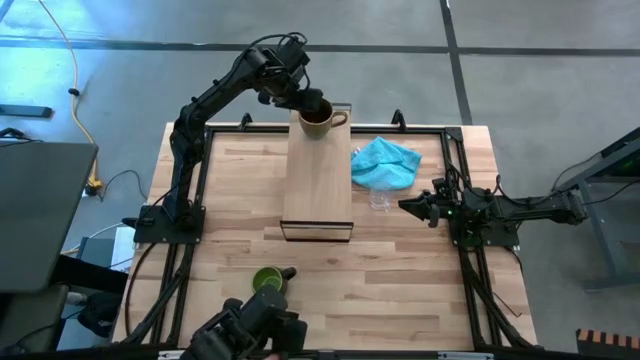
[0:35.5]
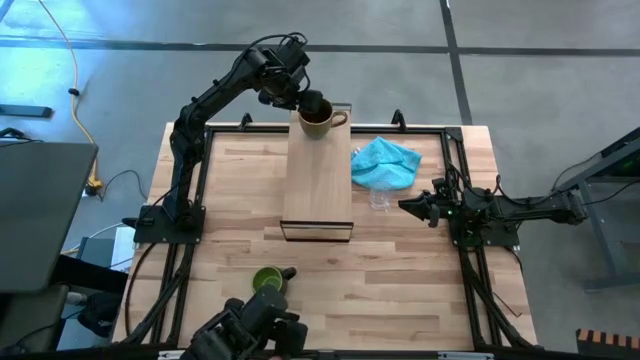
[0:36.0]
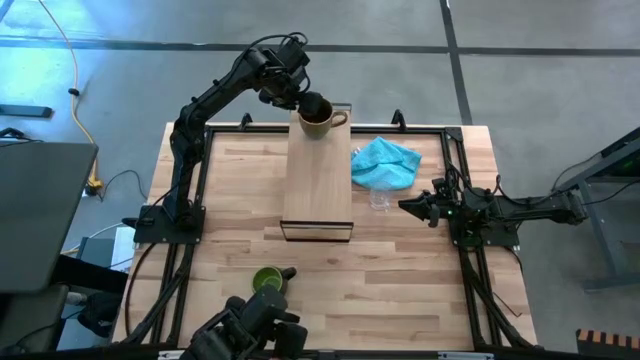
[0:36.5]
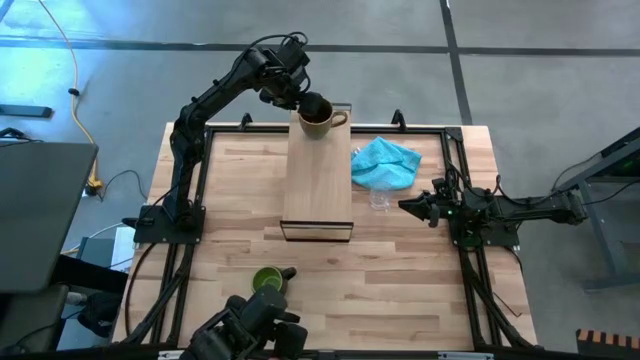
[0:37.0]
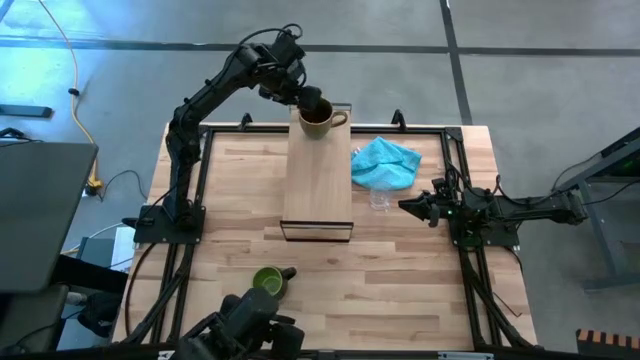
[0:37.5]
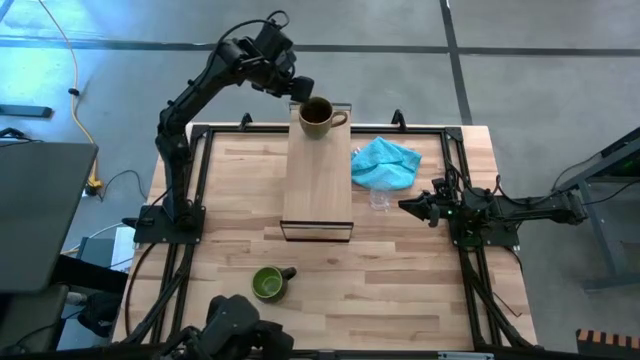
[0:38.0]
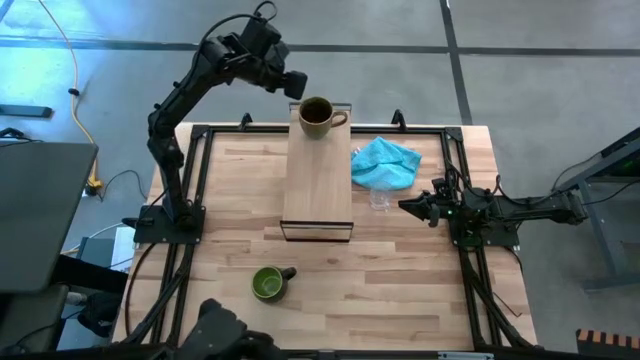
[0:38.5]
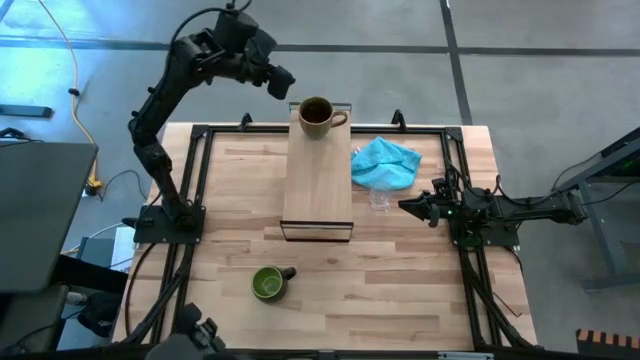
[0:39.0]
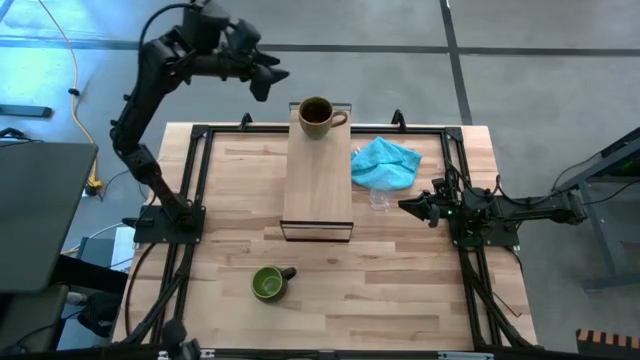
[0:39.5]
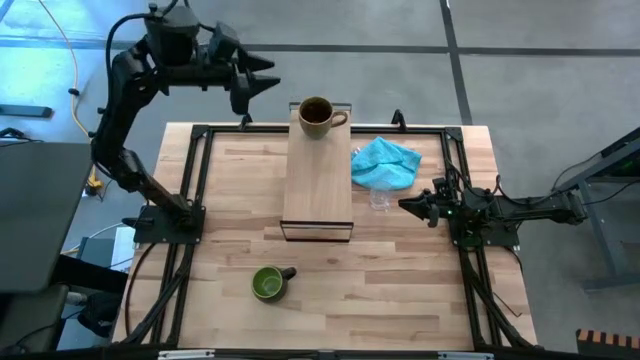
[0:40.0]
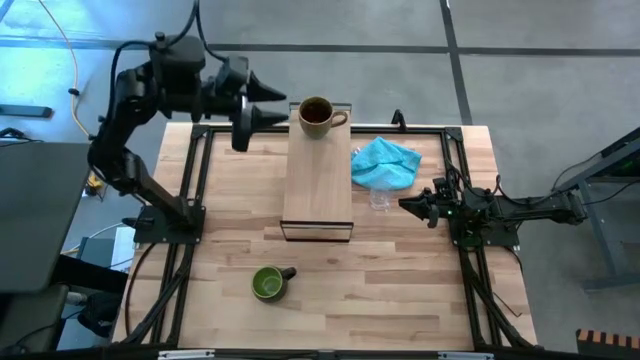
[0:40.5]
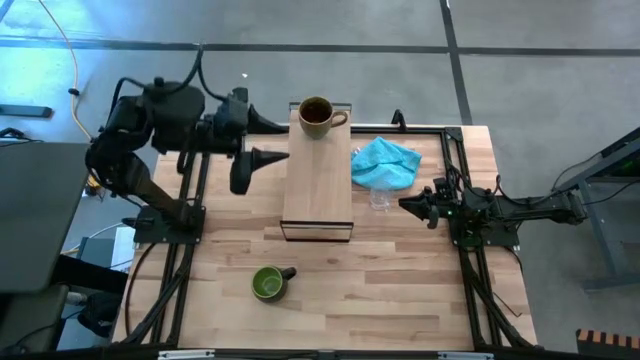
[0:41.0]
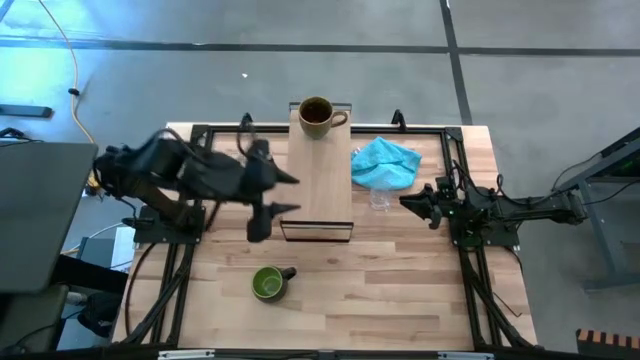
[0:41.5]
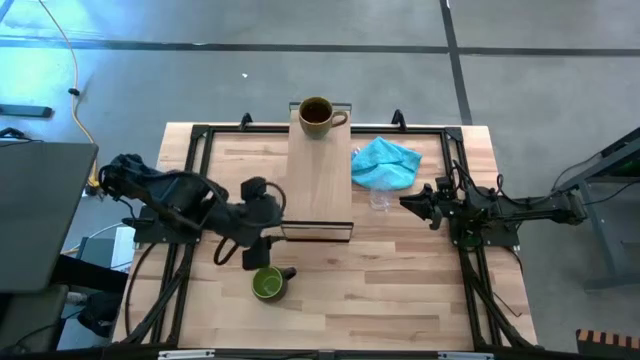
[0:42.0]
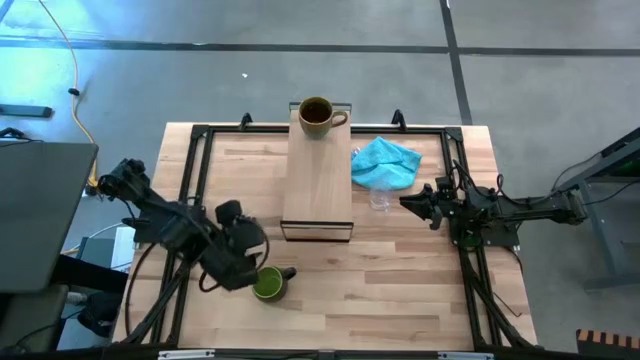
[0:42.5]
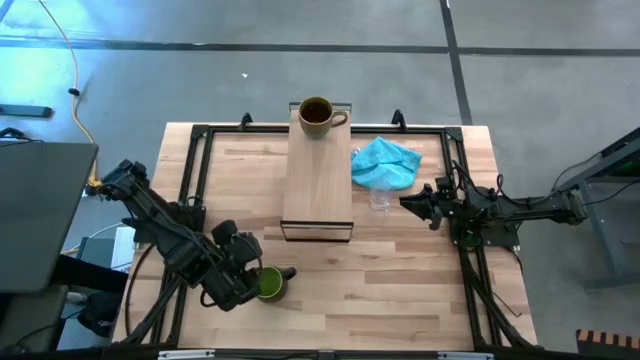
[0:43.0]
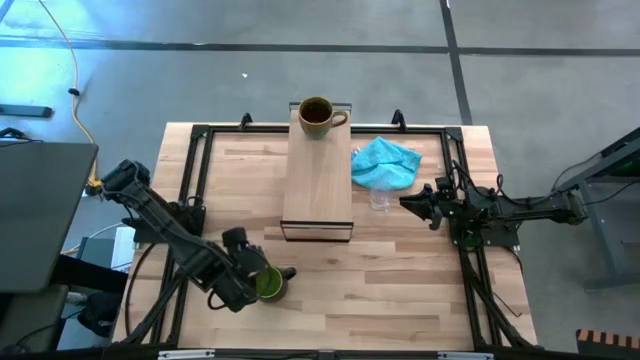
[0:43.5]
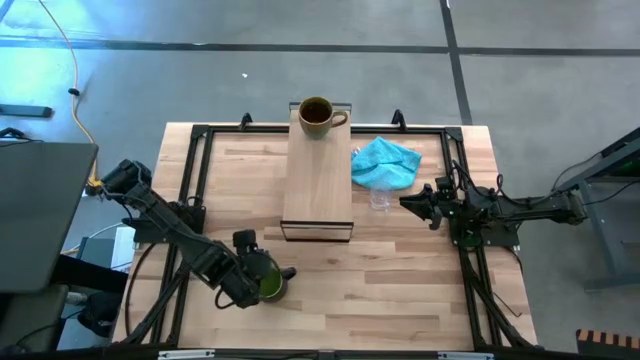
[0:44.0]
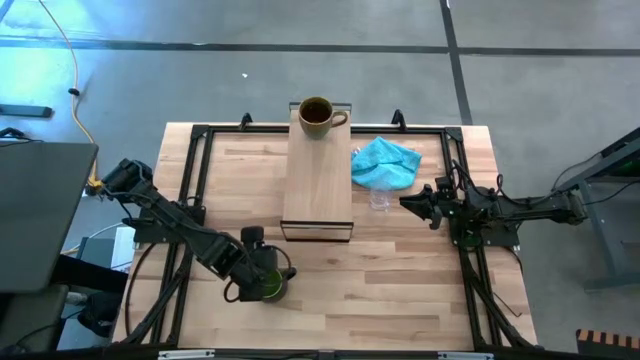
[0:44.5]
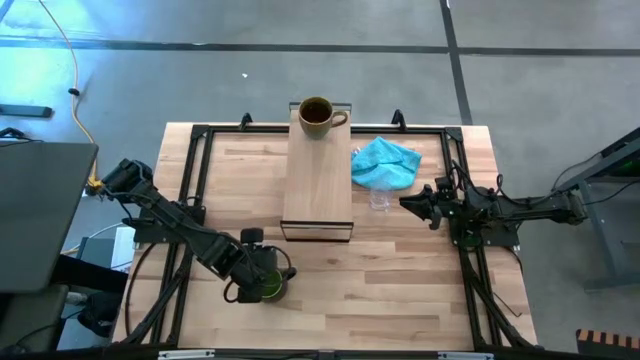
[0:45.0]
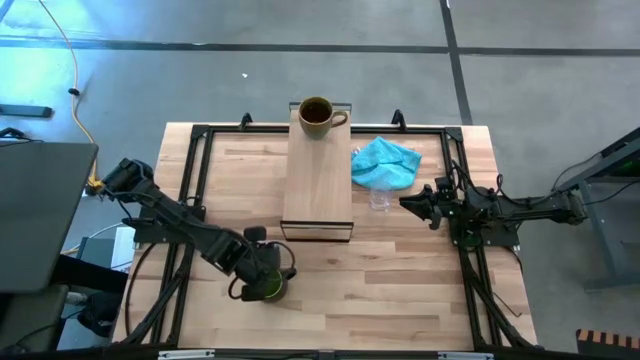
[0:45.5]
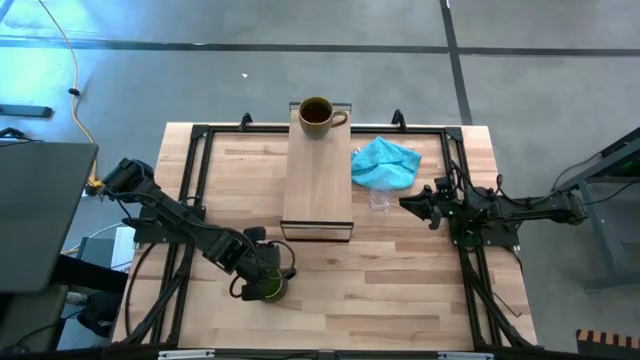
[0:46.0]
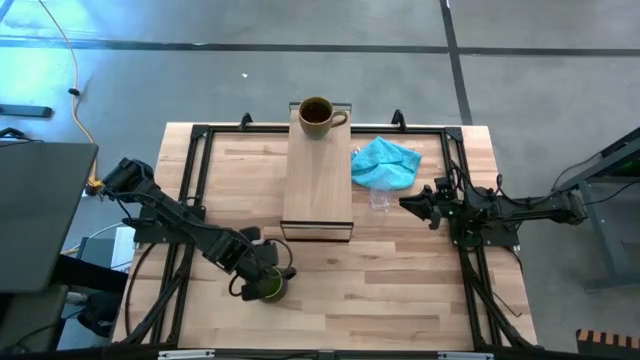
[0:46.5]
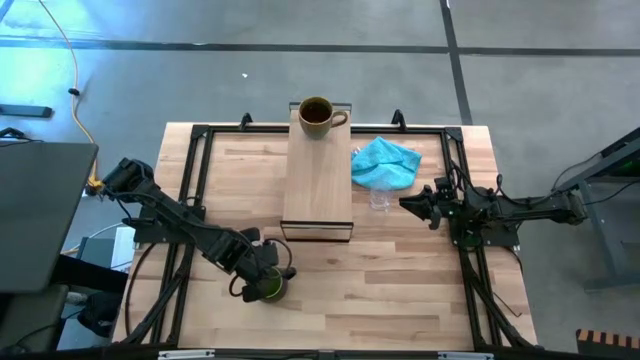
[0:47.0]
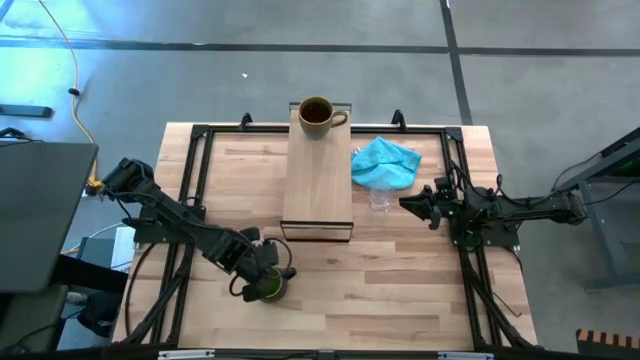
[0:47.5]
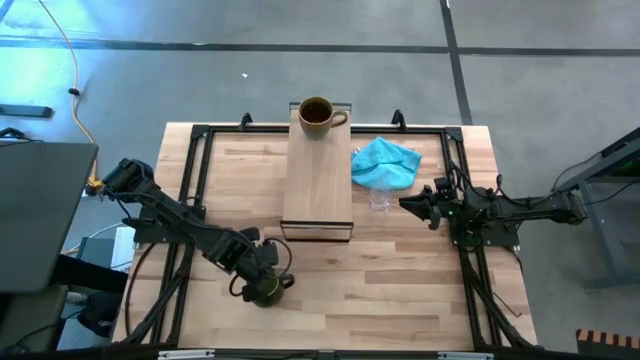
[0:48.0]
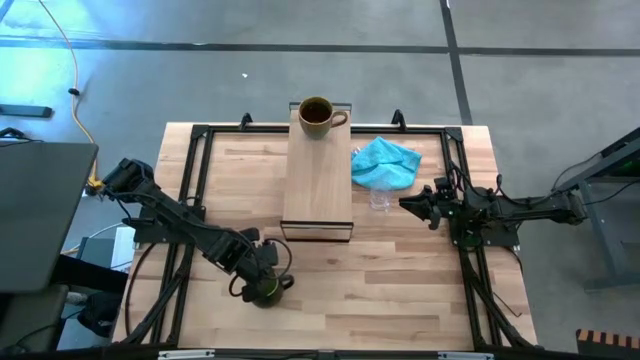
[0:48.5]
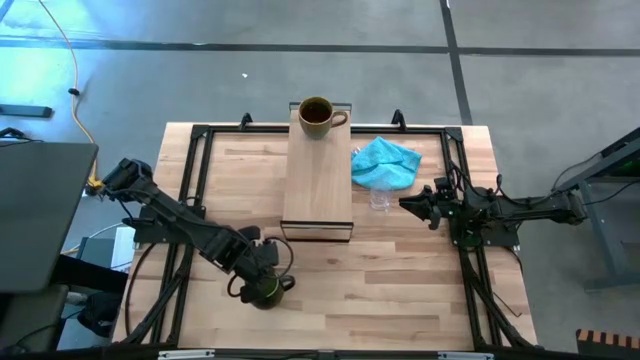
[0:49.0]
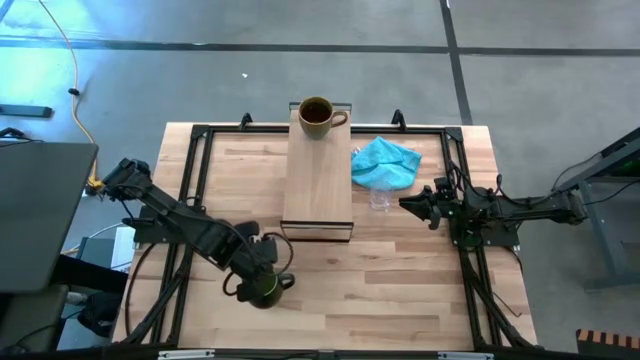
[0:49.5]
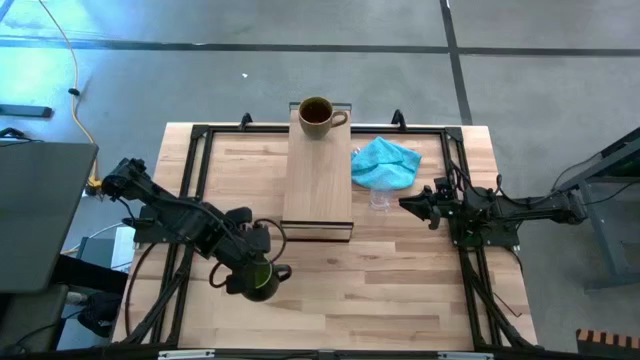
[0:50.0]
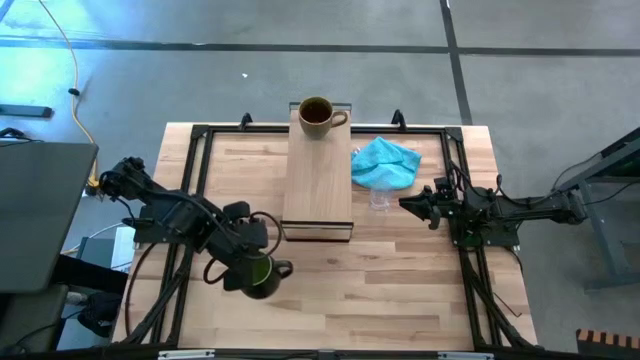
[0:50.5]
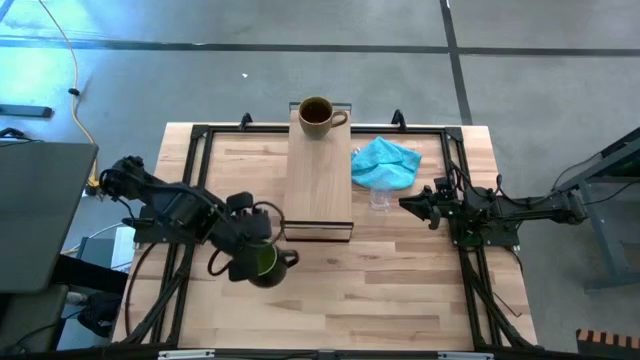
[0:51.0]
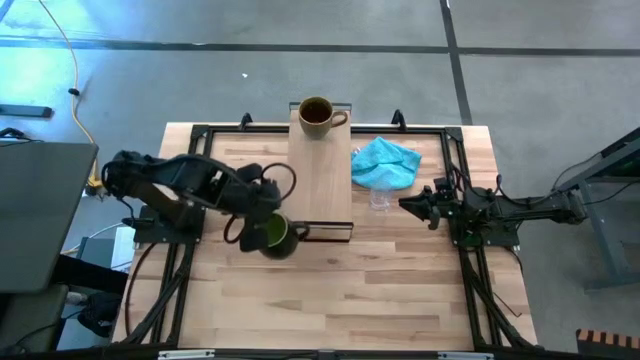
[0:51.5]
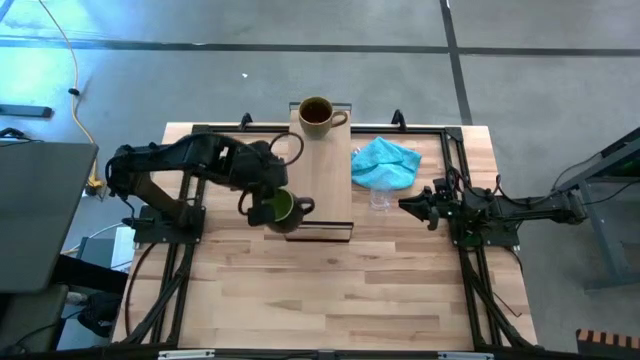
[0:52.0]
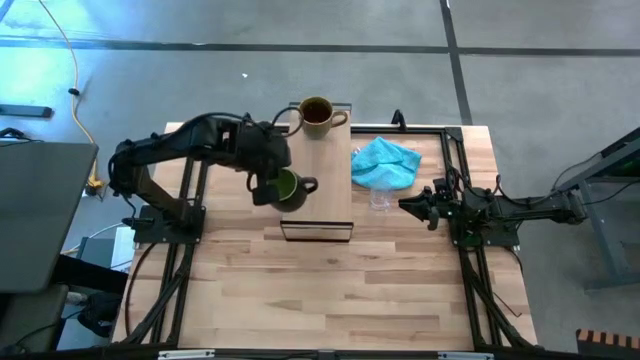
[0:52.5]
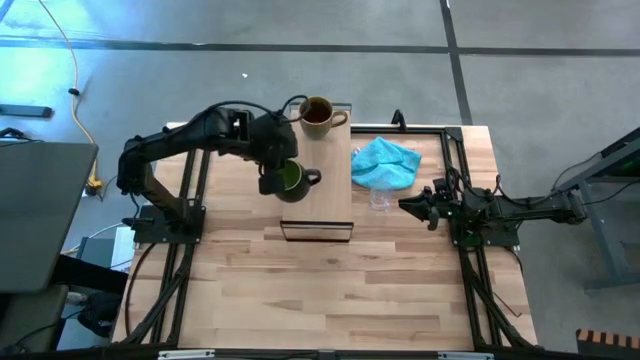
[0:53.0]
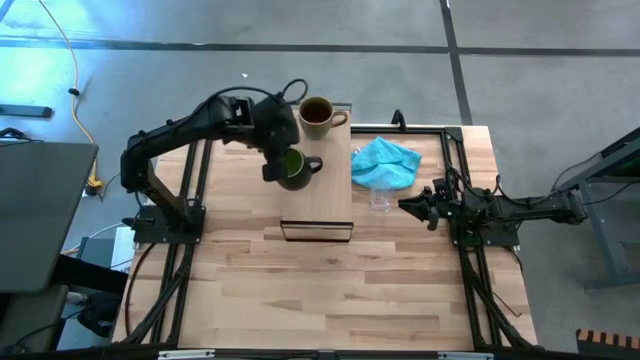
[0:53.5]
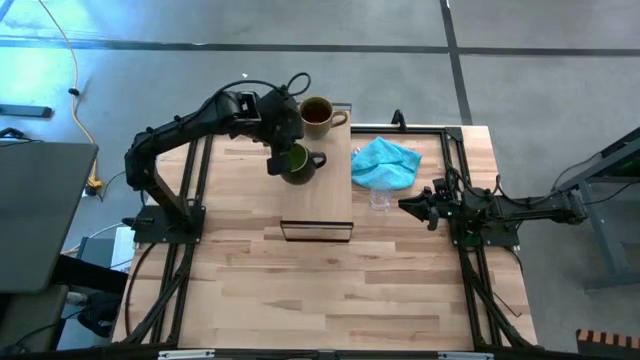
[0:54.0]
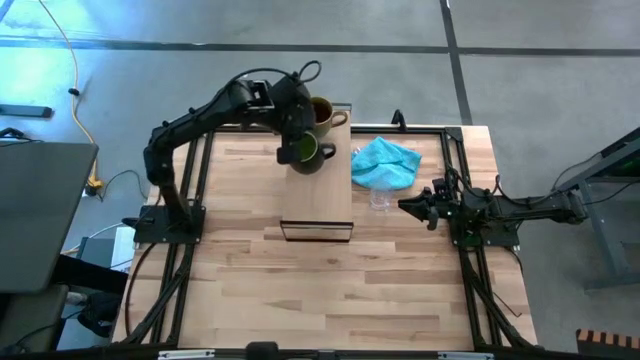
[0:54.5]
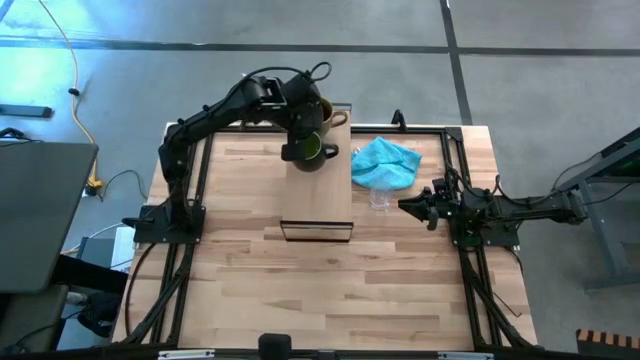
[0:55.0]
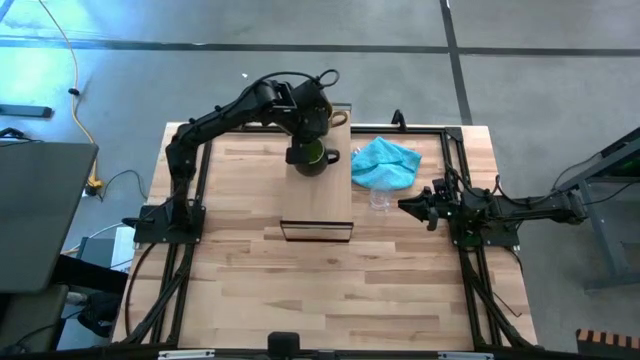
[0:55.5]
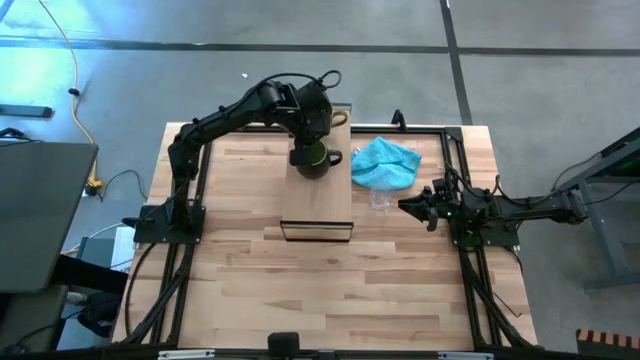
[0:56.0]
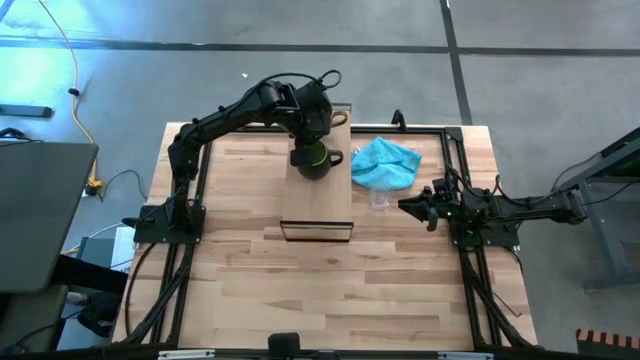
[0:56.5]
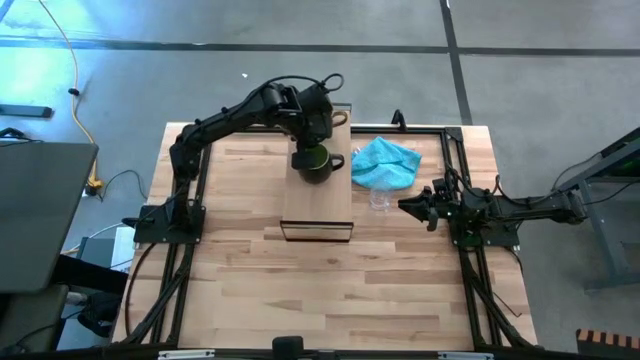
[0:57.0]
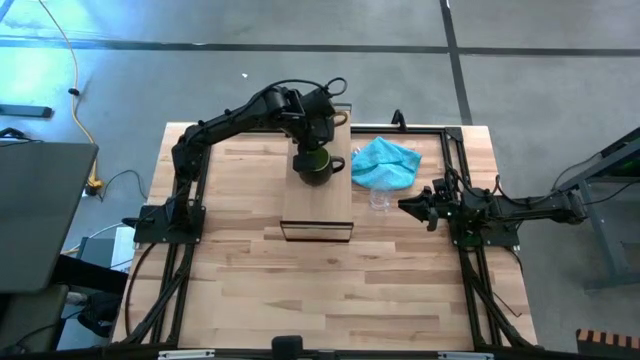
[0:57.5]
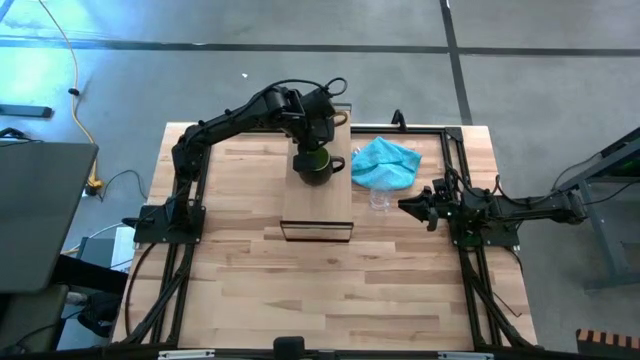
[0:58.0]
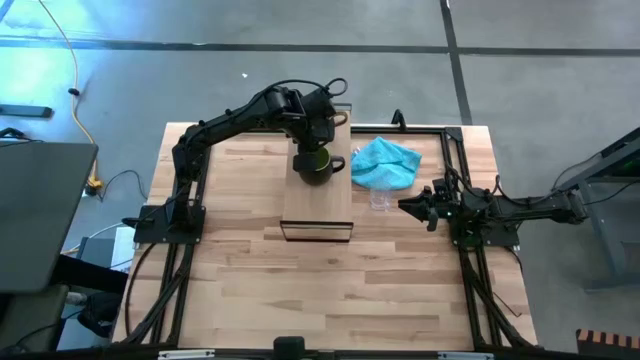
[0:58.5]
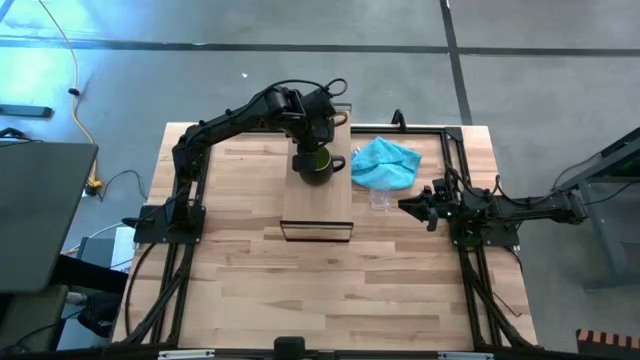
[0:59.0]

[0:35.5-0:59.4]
Task: Stack small to large cups/mugs on shelf
Put the green and black mug on the shelf
